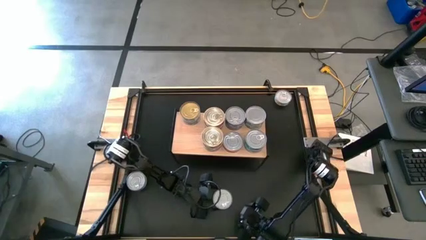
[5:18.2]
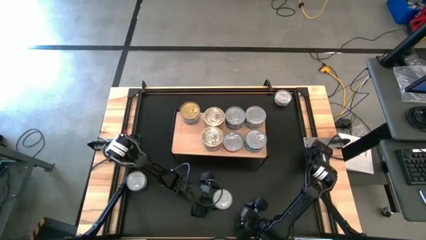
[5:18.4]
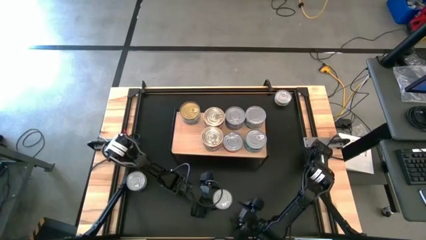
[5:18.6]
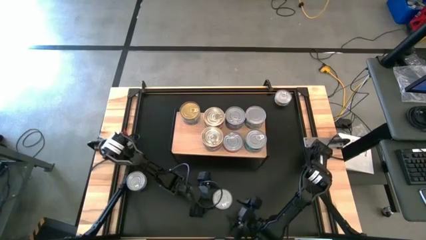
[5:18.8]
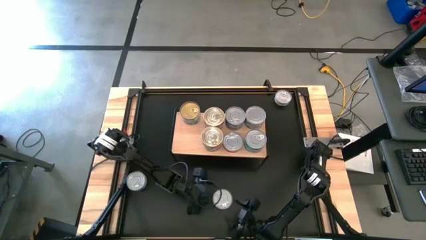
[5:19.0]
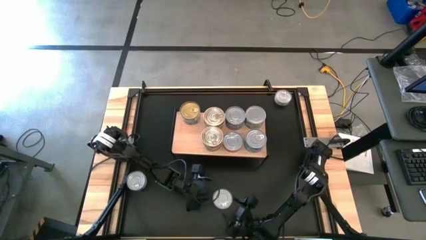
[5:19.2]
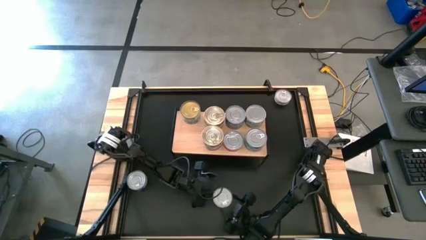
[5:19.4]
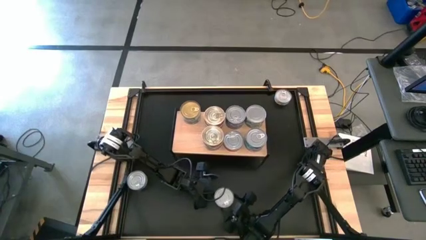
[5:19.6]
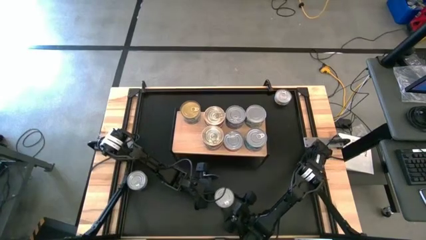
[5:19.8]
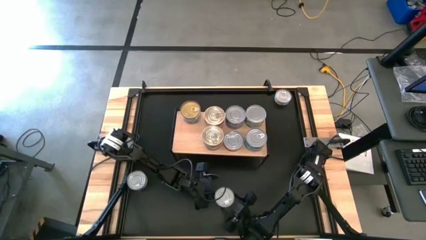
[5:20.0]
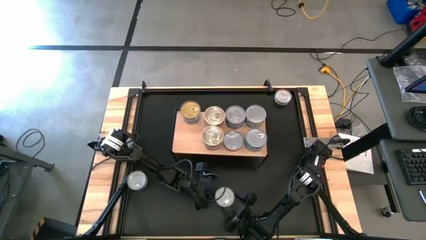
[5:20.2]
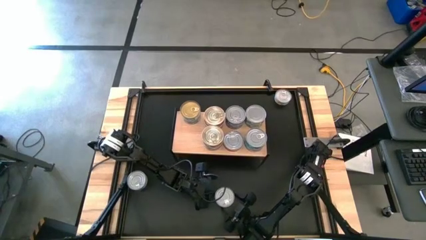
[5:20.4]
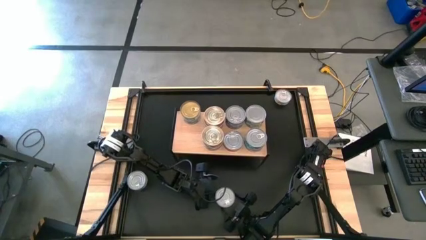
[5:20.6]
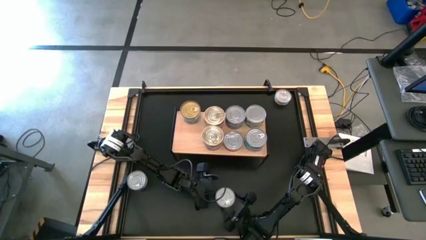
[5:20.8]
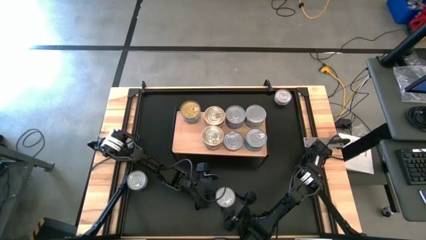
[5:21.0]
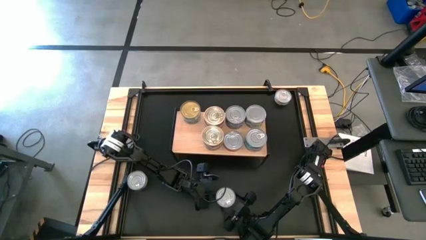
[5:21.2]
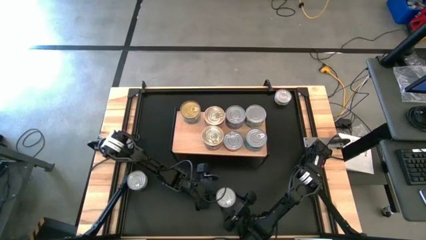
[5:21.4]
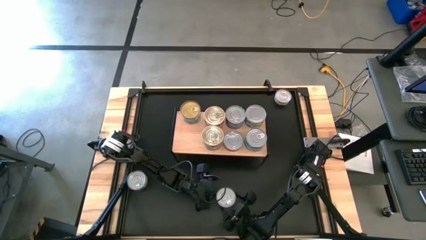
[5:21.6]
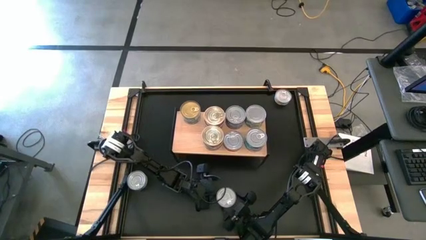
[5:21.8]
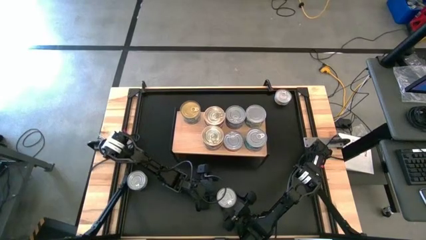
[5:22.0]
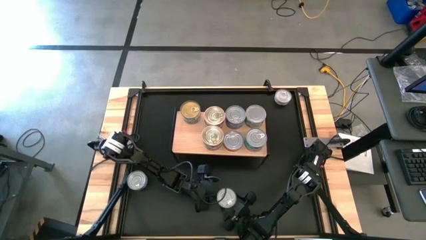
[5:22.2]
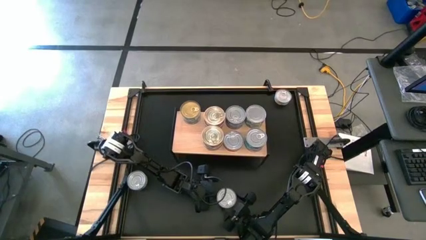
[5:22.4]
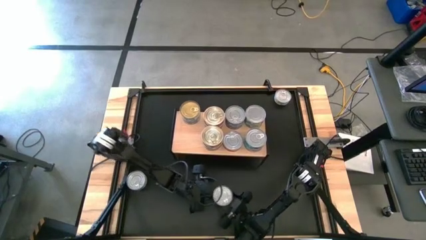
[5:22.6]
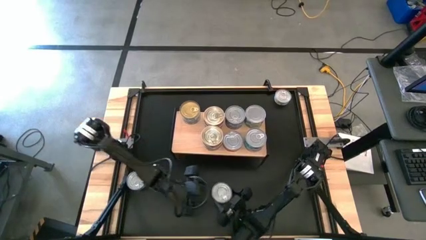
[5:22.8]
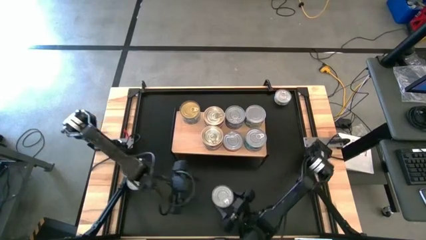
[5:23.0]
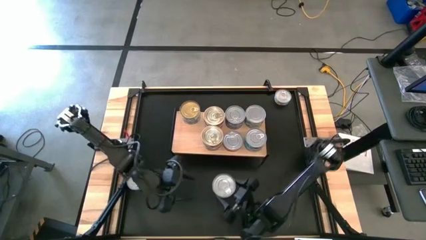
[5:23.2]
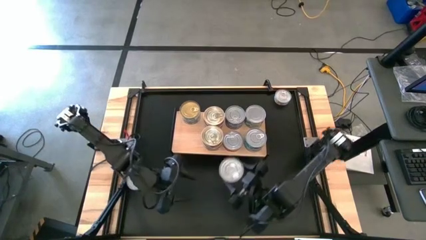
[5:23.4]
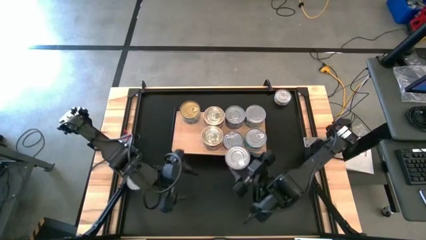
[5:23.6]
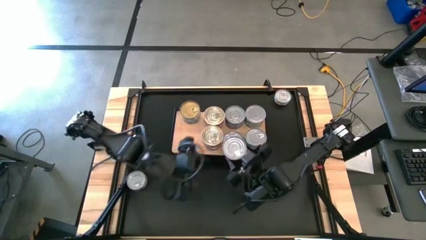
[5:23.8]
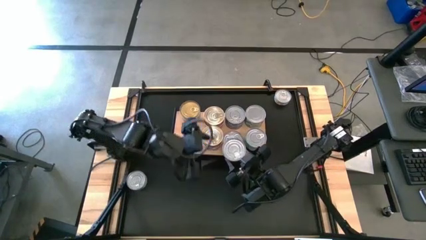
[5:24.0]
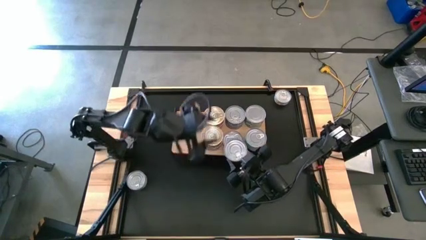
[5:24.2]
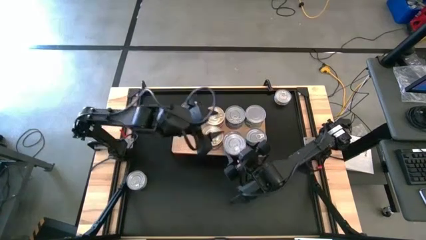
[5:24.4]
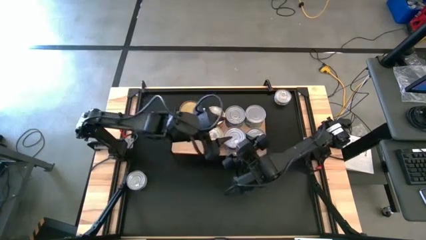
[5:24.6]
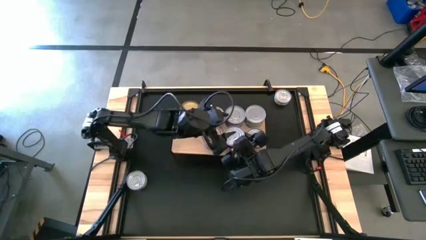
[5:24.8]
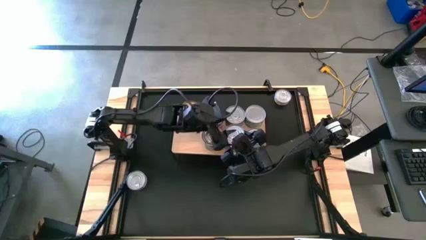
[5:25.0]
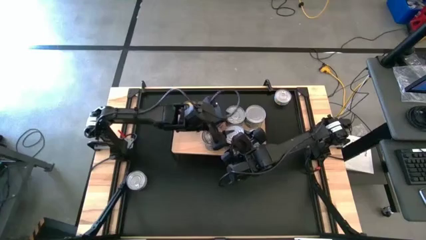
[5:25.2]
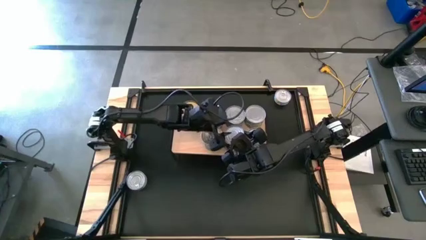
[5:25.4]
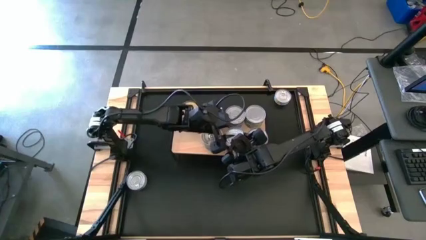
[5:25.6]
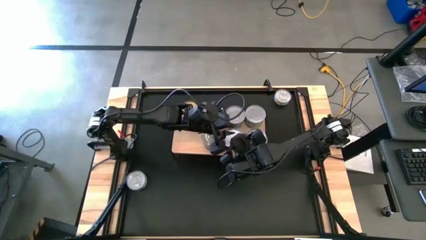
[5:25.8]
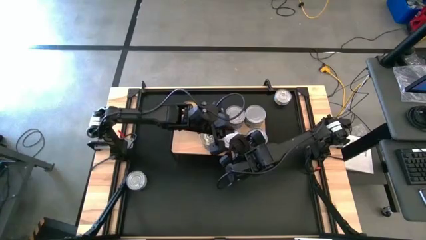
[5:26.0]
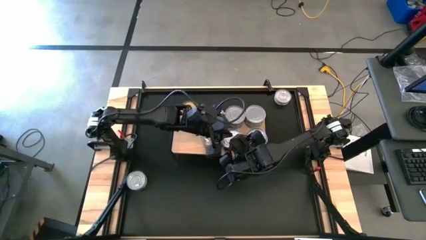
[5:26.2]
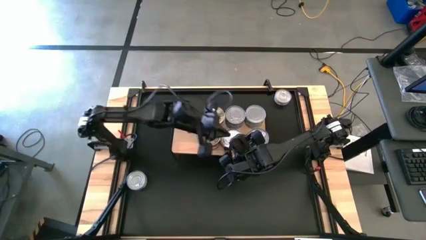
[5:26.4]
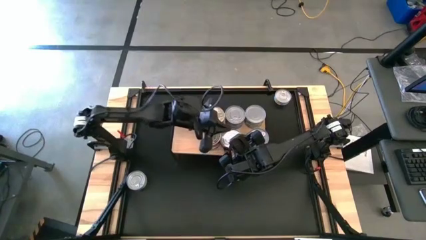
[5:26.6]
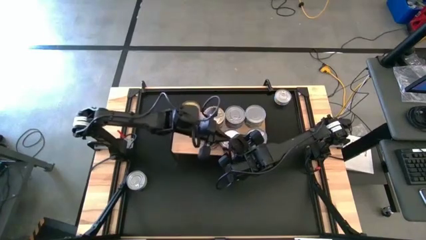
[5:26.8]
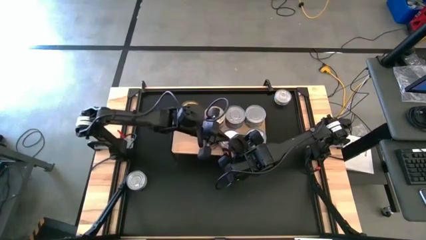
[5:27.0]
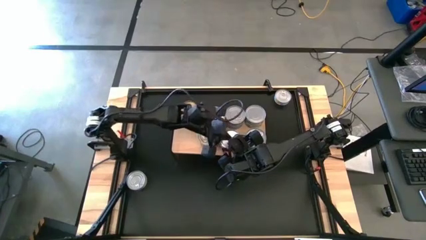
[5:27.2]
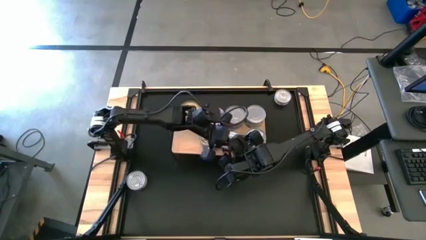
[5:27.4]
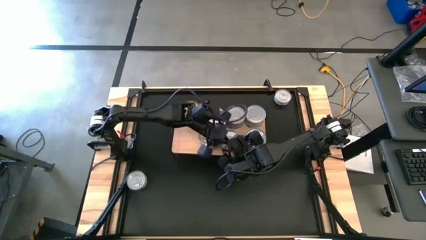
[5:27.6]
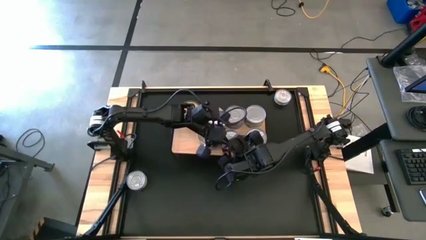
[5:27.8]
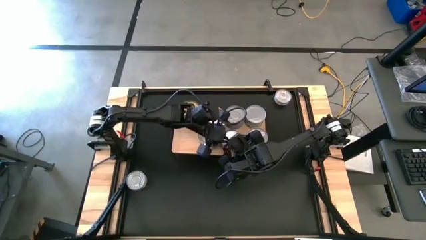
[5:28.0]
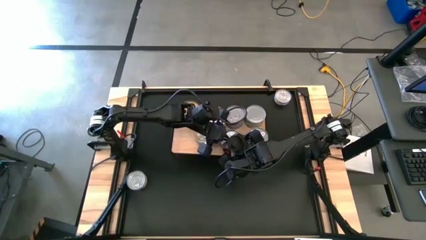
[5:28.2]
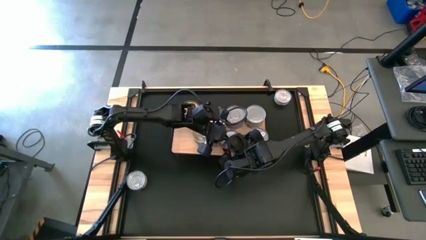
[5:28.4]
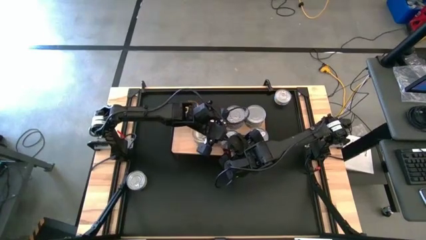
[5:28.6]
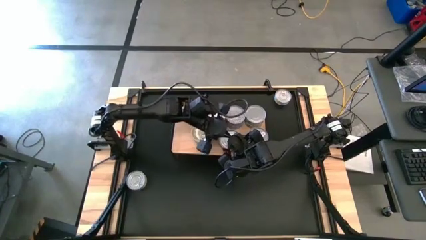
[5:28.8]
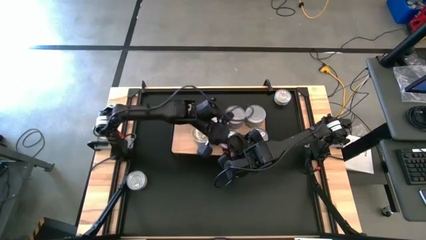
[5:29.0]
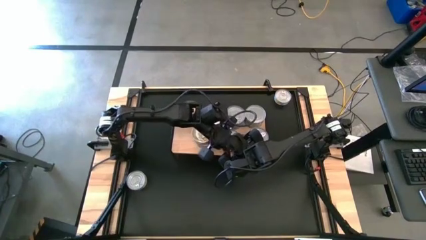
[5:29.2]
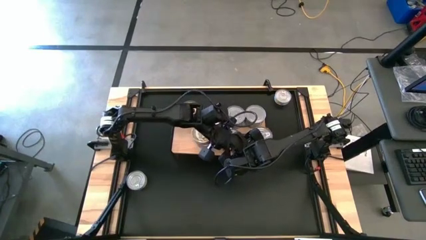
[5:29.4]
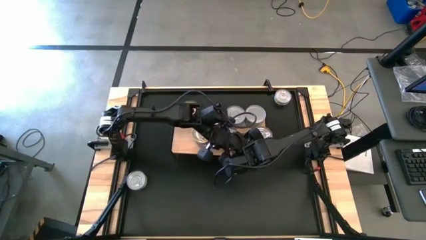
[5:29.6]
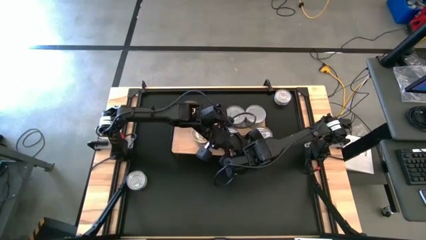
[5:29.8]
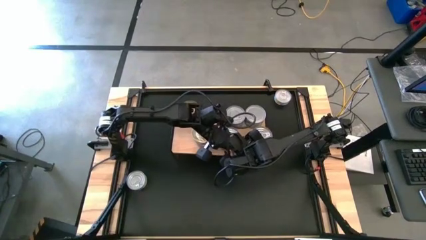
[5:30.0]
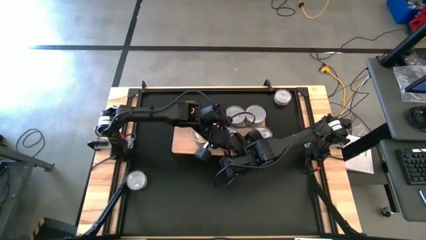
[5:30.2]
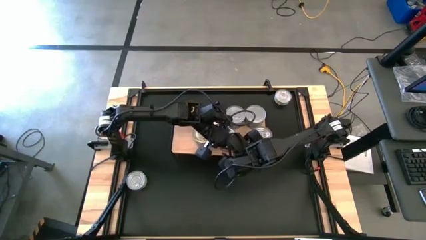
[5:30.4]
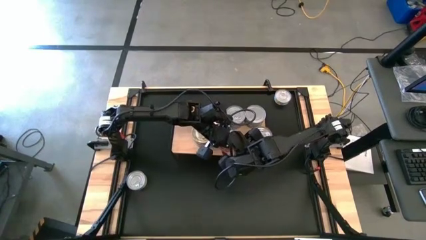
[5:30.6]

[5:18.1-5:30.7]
Task: Stack canned seafood by type on shelf
Stack the red tuna can on top of the red tuna can on the shelf

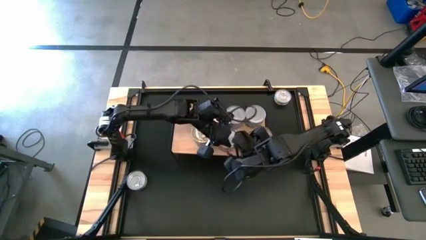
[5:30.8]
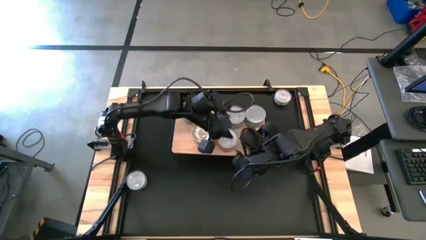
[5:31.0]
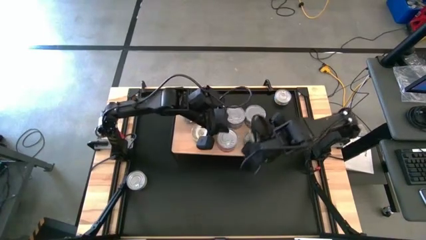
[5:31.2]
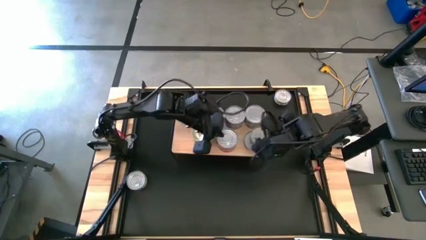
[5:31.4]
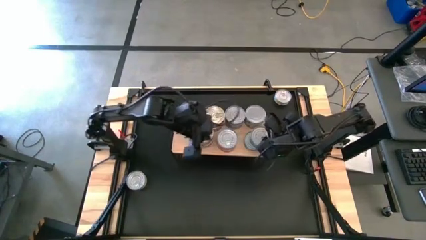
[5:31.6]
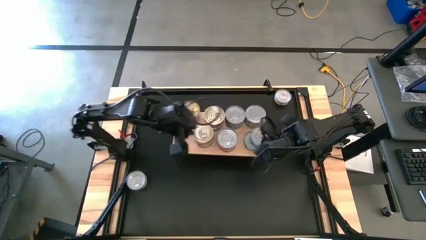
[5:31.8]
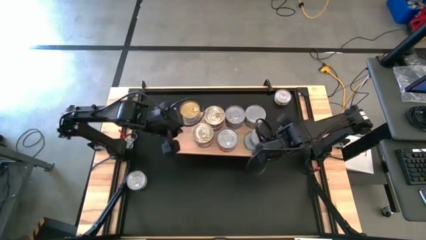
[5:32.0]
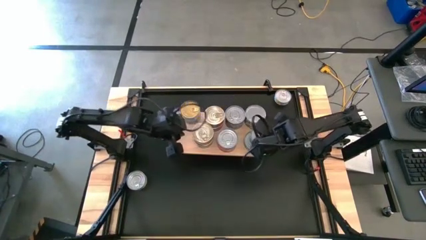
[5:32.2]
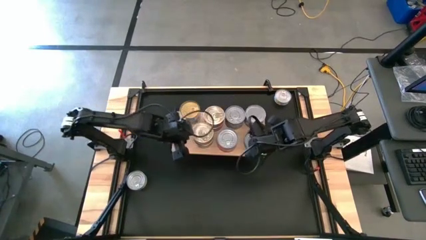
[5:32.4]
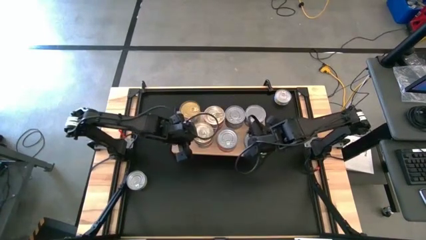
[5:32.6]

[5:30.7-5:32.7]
Adjust the tuna cans on the shelf

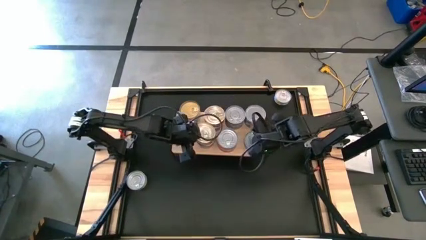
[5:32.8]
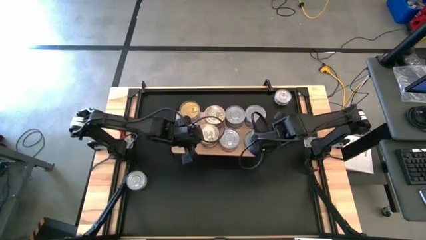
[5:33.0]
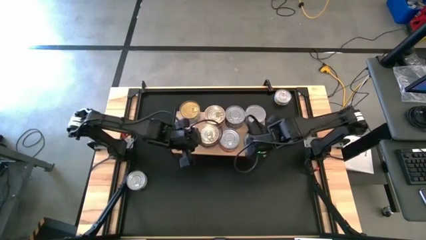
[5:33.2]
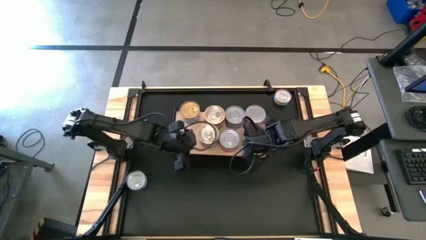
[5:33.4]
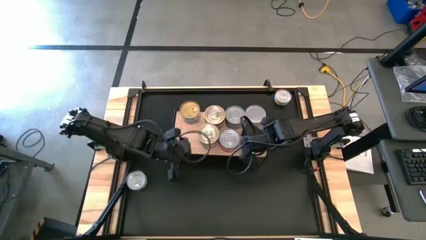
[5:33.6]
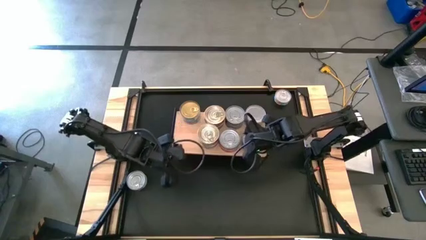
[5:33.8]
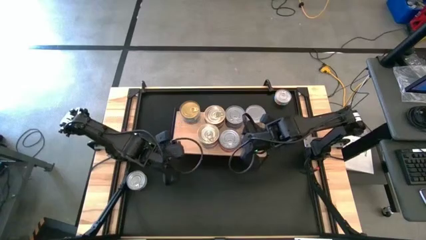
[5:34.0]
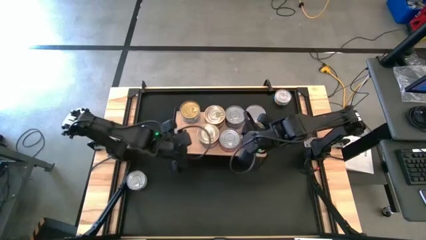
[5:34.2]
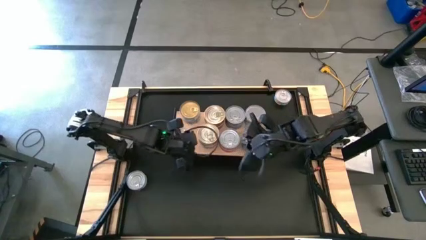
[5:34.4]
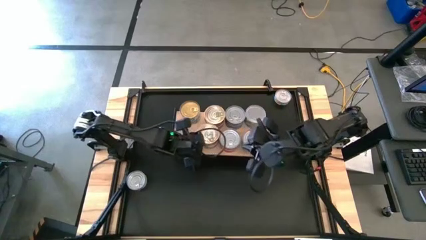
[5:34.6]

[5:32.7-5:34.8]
Adjust the tuna cans on the shelf

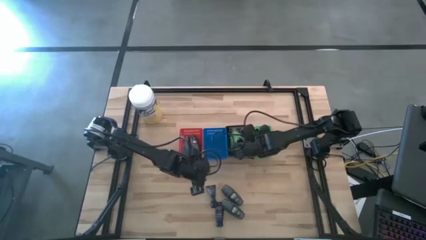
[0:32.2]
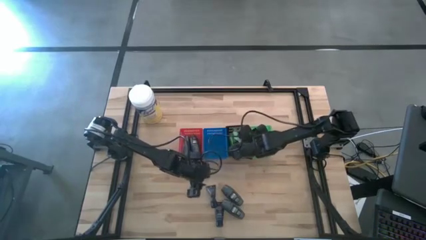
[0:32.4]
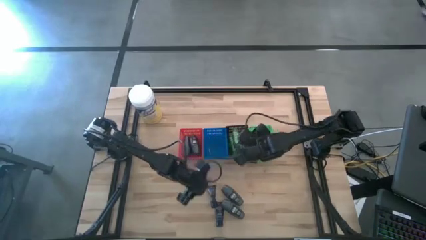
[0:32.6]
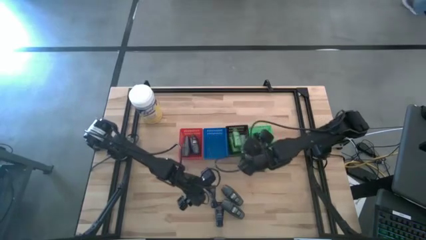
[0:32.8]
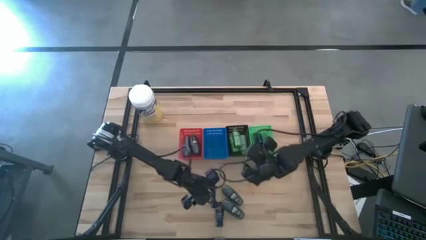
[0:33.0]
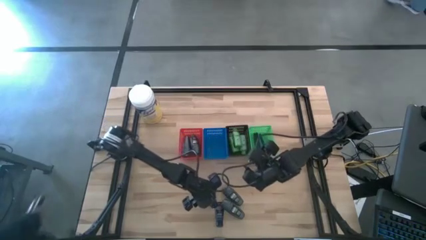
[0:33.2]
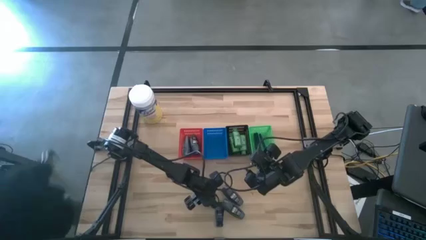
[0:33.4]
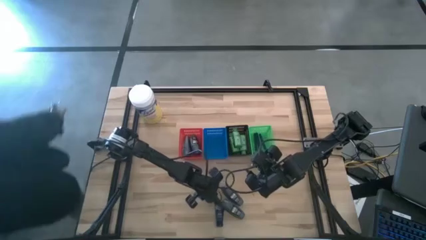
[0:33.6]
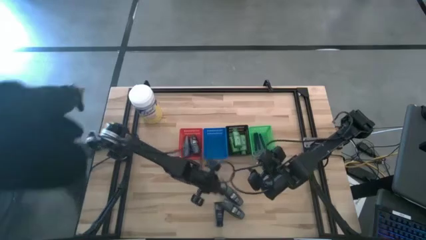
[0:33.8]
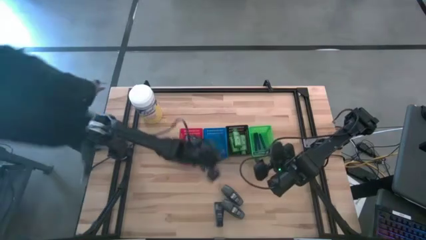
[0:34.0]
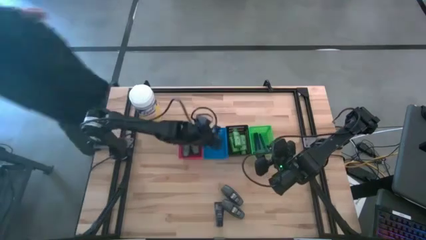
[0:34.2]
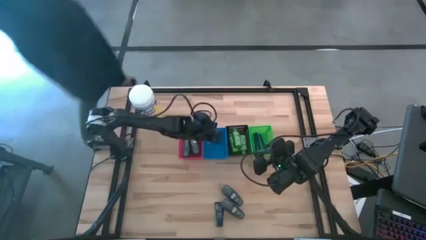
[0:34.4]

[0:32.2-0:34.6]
Task: Pick & Place Travel size toiletries
Put the blue shave cream into the blue bin
